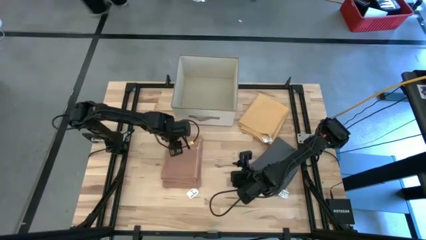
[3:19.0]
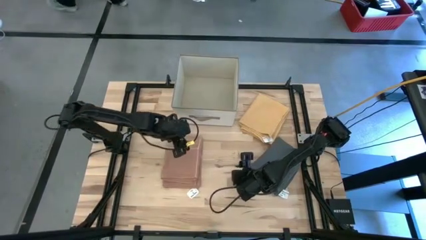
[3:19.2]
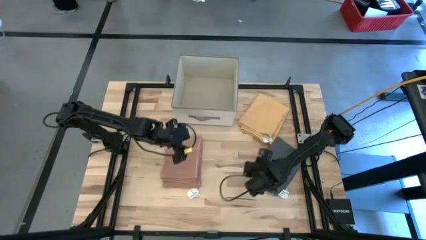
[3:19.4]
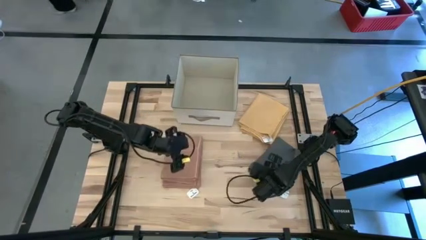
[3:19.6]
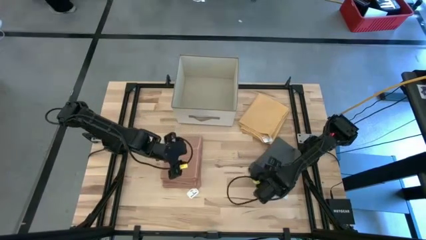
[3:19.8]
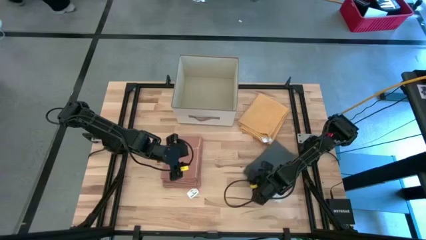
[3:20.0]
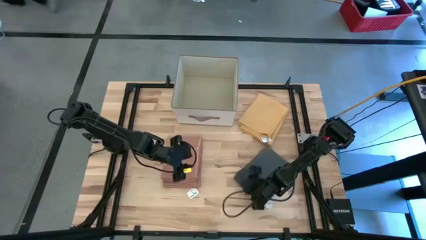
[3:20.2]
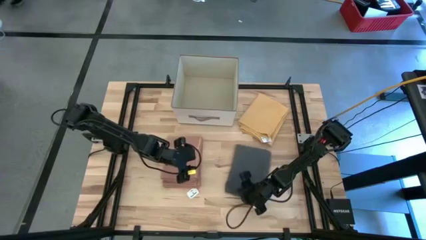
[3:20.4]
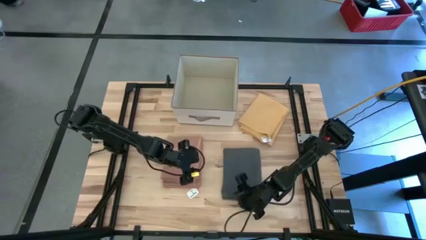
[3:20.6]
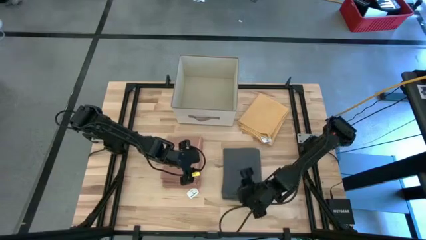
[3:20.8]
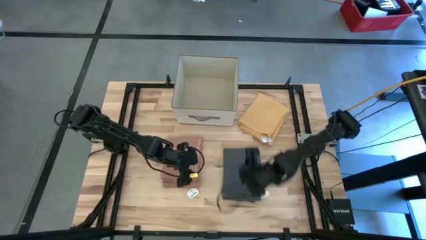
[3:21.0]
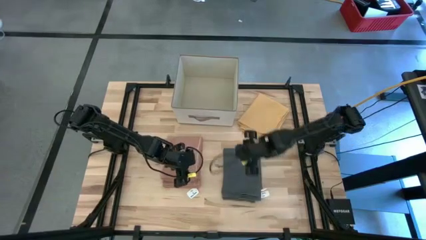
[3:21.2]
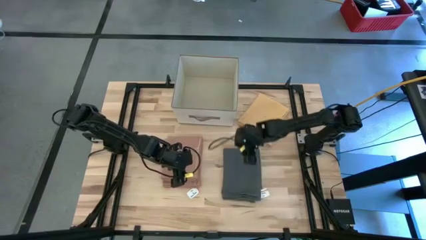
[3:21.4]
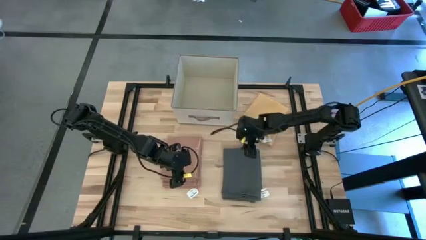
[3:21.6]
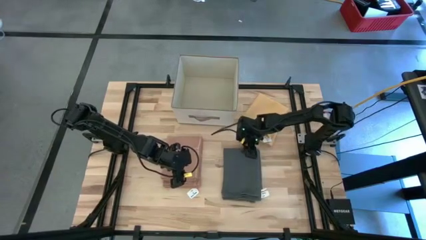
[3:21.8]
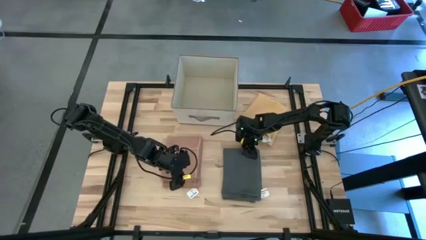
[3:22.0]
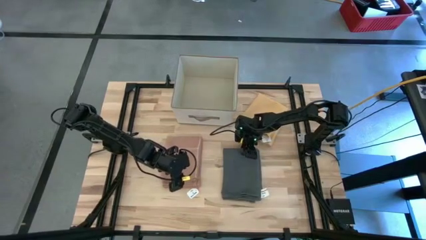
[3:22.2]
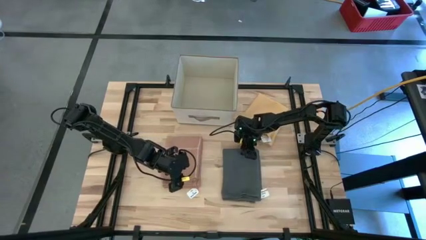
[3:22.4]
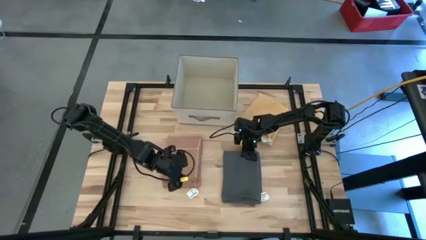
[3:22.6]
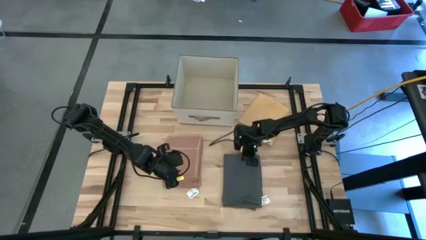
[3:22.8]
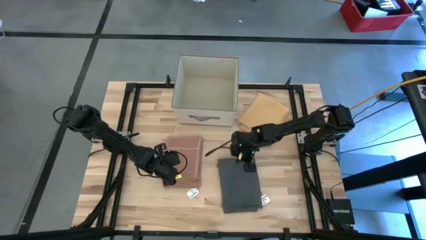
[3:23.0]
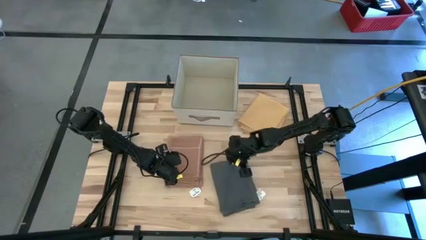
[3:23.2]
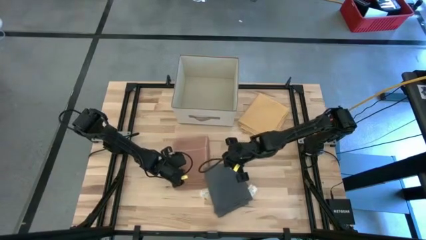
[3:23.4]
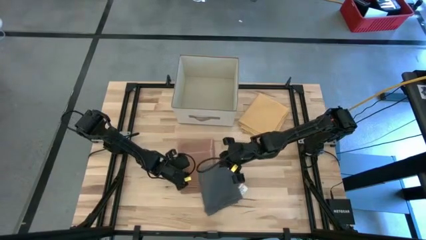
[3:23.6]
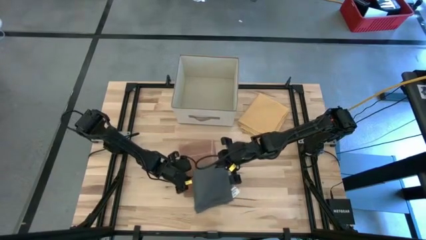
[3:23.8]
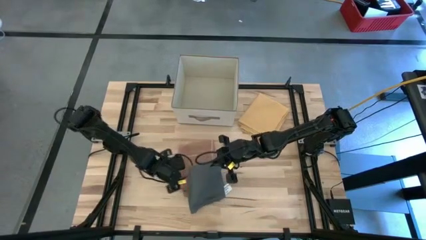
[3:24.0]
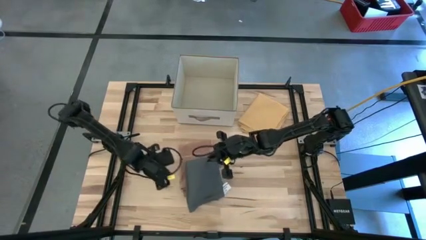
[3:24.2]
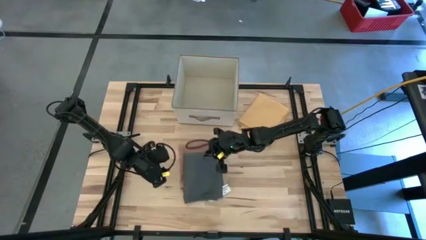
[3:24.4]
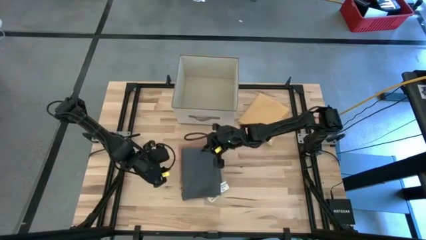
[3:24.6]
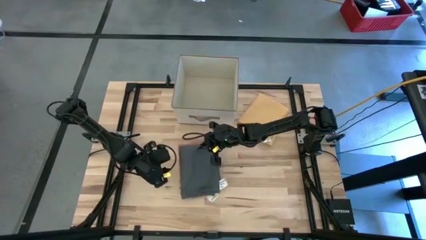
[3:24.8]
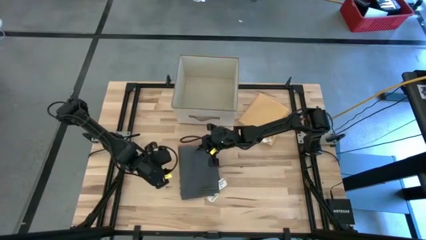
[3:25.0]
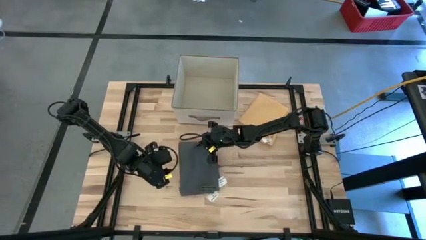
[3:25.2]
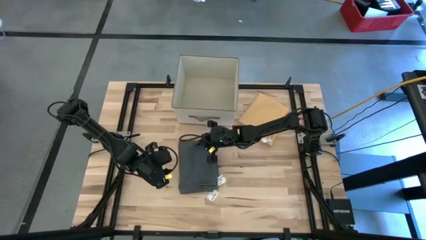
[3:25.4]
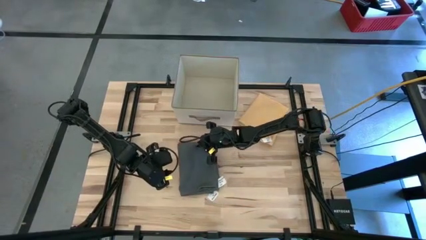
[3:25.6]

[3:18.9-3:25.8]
Task: Fold towel
Stack the dark gray towel on the brown towel

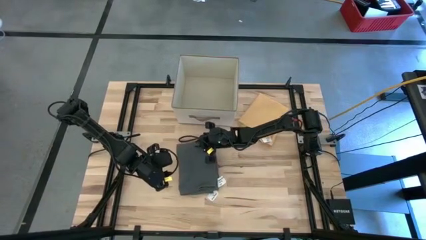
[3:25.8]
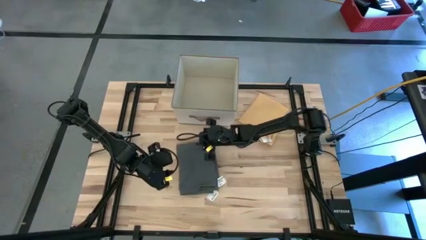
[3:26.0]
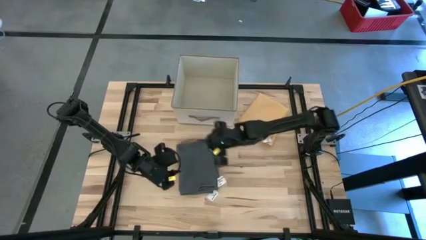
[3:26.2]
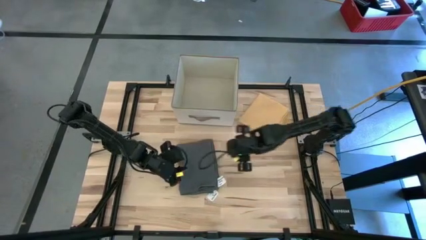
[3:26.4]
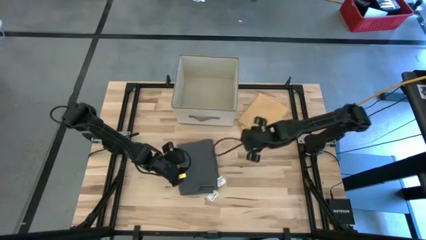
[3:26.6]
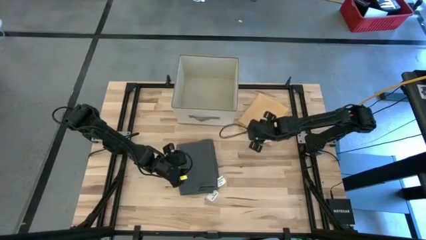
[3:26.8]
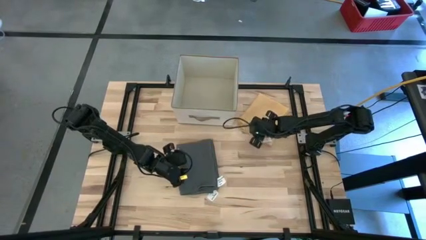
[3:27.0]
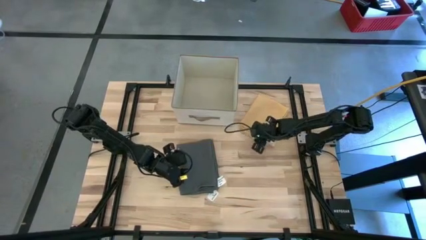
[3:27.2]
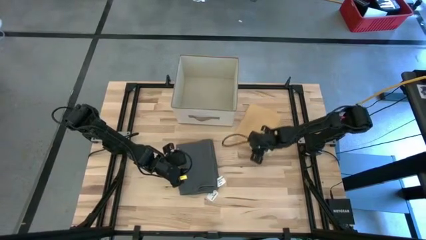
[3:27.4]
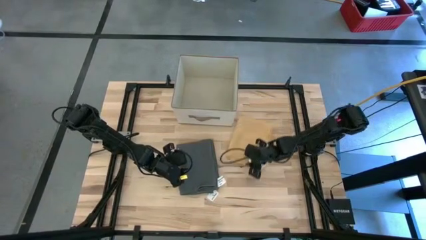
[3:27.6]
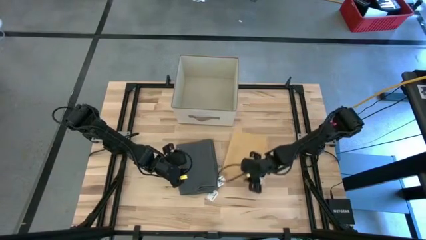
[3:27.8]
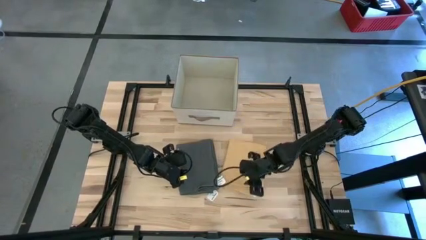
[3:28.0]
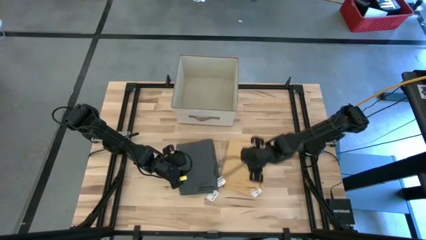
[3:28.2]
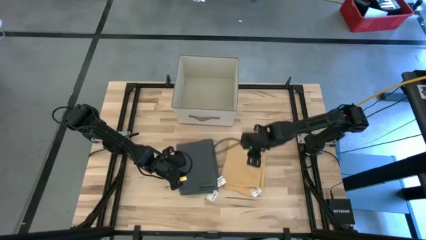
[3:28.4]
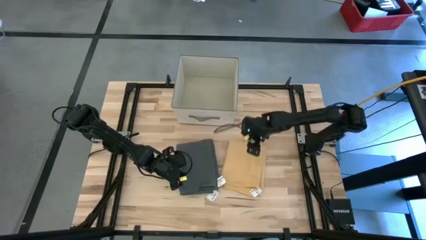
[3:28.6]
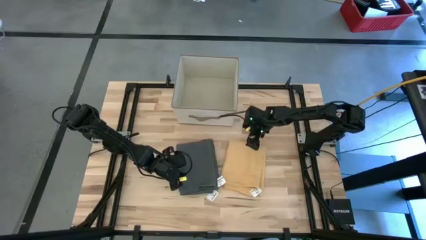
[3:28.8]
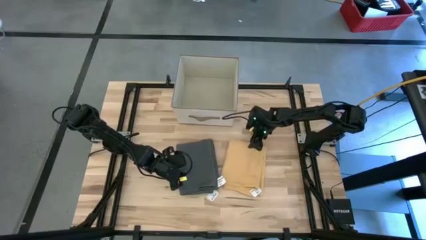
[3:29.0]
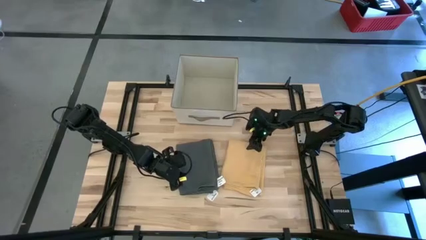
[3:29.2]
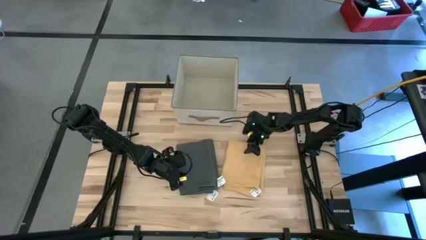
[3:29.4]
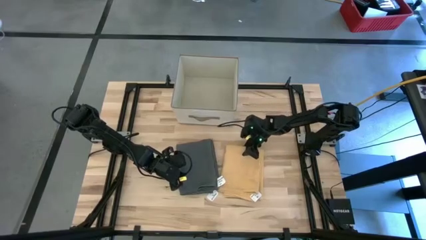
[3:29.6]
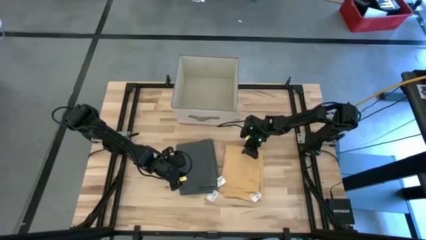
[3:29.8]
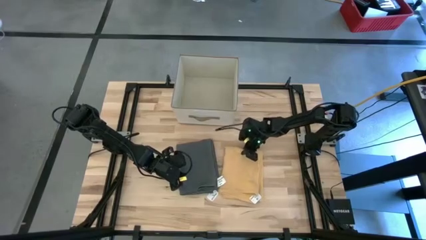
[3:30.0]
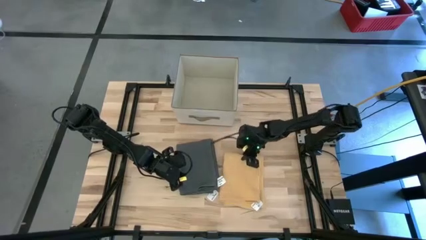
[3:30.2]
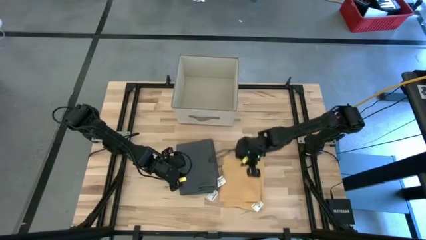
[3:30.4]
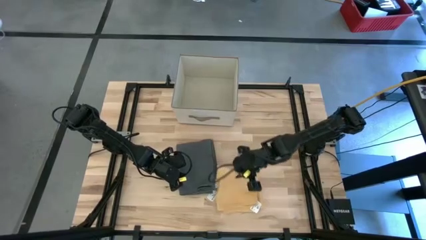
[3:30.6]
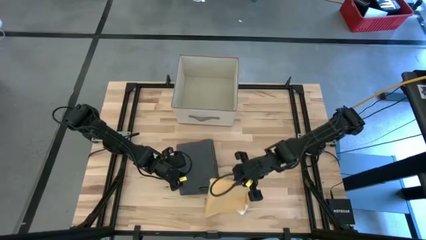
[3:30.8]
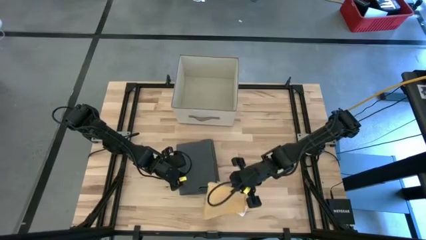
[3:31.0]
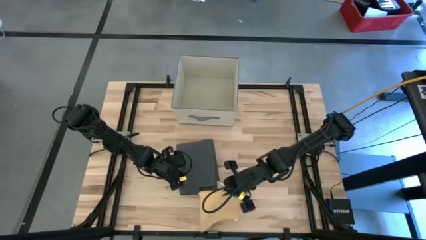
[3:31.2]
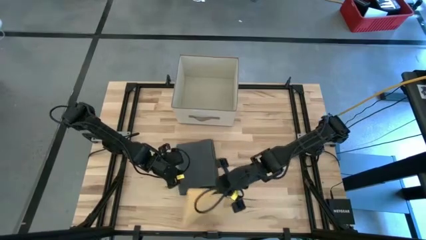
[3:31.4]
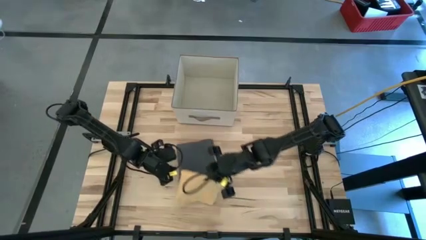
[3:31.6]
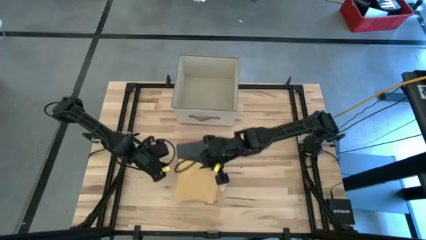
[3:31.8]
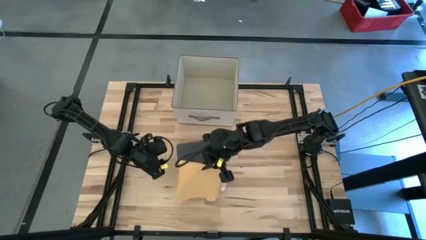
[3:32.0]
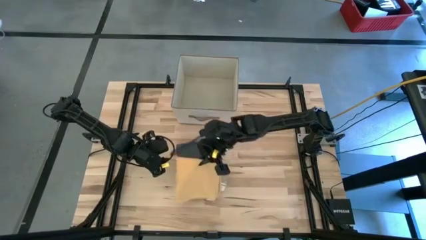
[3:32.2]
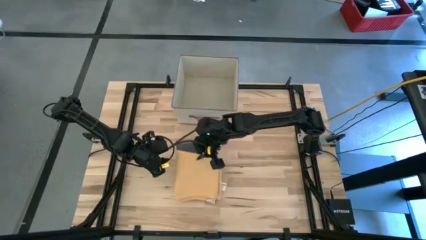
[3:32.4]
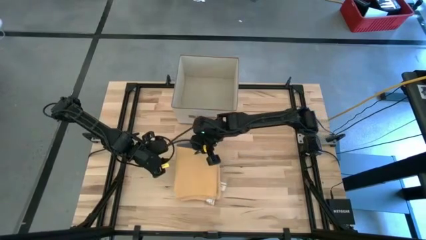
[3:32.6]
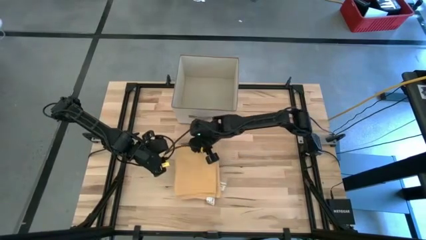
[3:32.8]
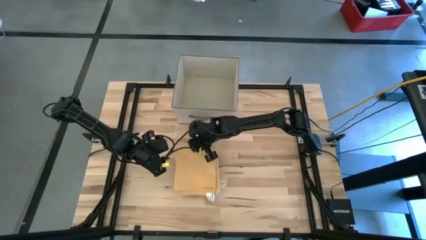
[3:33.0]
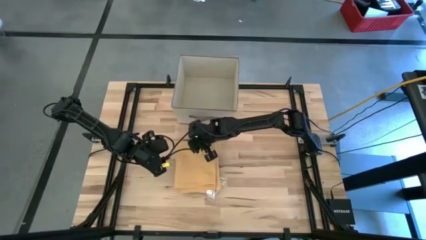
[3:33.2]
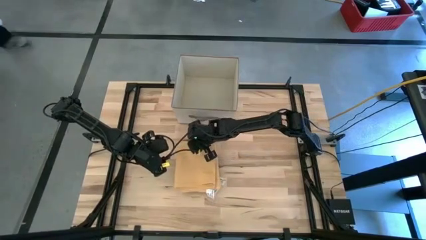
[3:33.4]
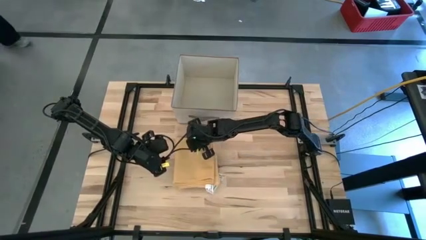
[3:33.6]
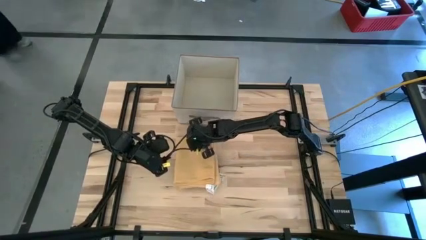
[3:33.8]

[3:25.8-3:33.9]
Stack the yellow towel on the dark gray towel
